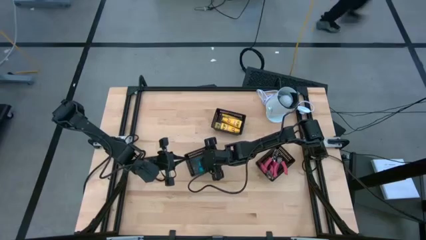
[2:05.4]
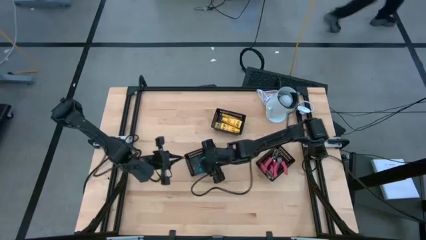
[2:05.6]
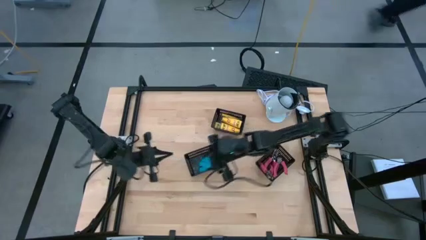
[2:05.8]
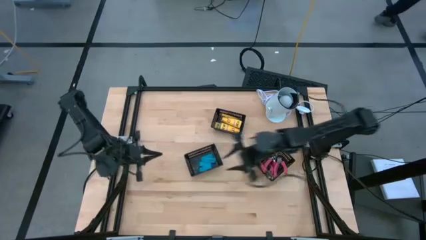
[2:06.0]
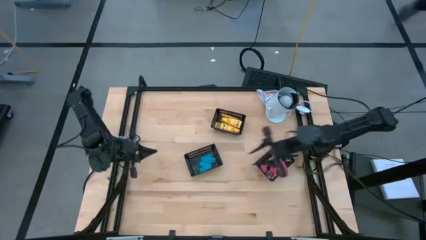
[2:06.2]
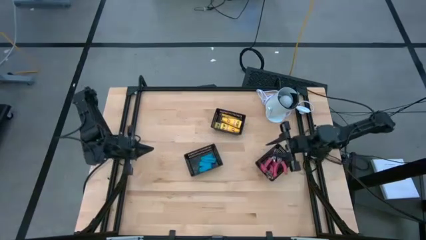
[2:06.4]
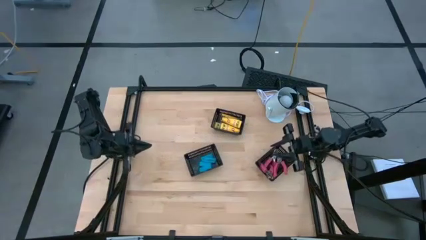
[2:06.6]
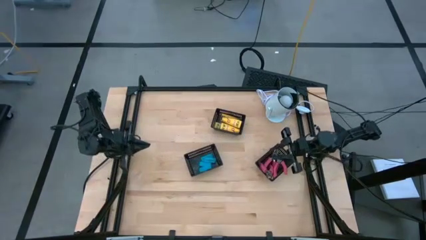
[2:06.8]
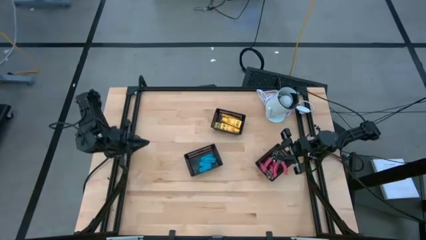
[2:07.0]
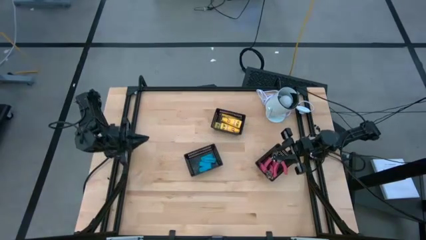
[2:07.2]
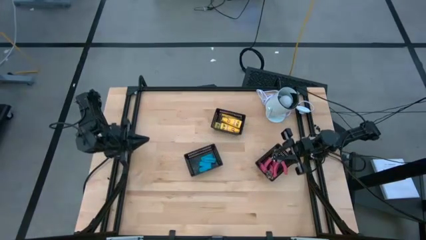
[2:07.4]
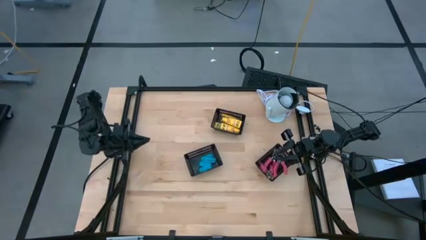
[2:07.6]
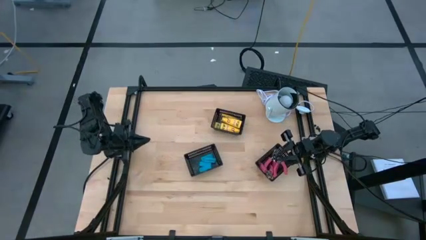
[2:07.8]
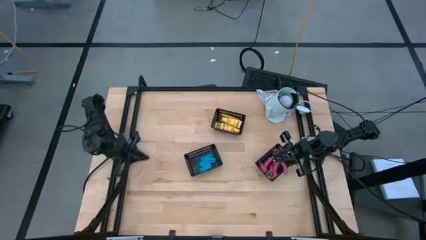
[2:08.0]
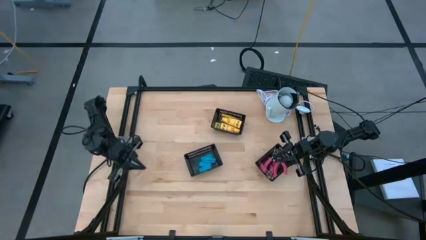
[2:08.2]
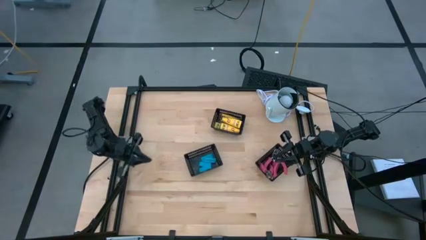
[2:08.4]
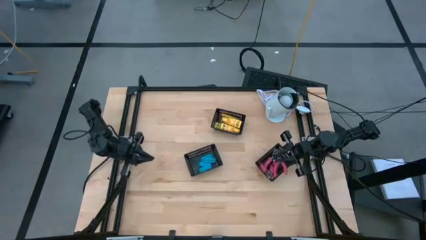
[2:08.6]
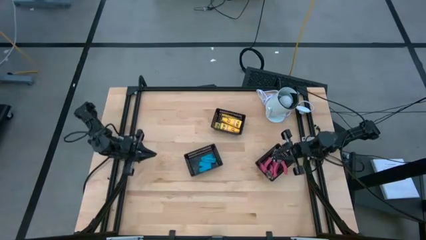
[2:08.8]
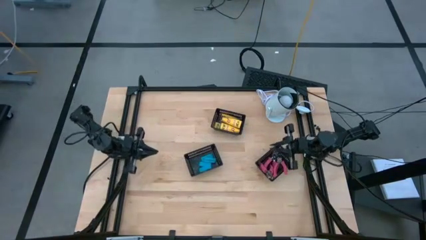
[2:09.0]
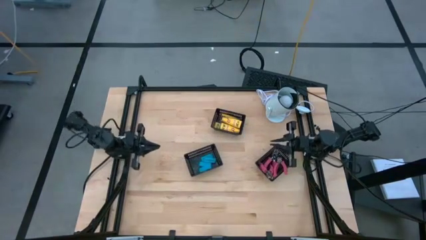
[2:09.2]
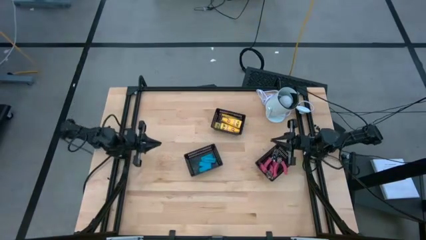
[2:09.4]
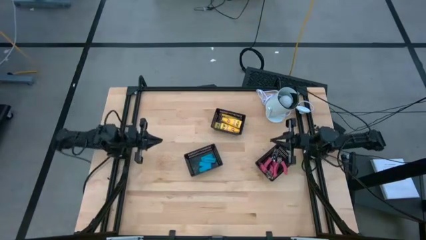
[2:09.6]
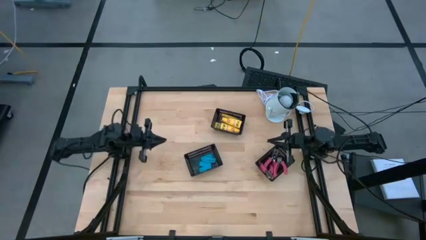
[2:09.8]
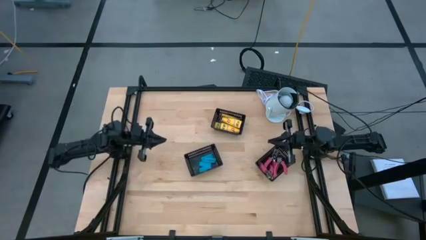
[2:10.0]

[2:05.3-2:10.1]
Task: Pick & Place School Supplies
Return to Home Position

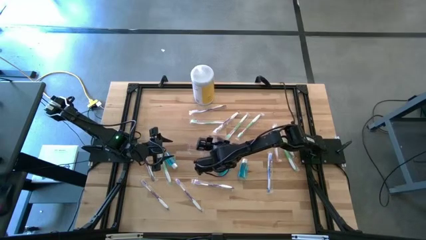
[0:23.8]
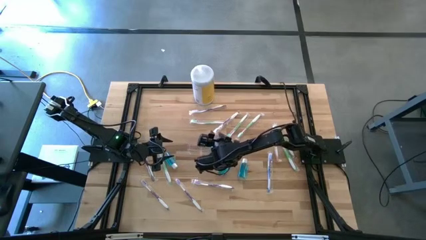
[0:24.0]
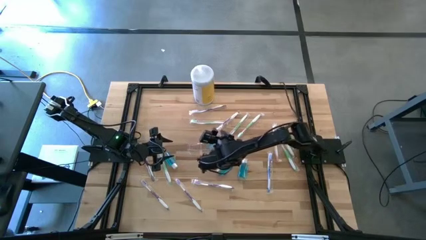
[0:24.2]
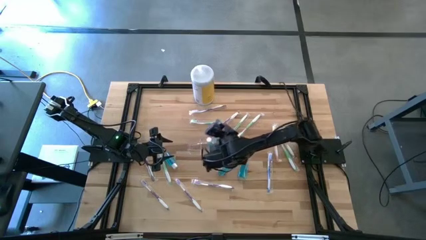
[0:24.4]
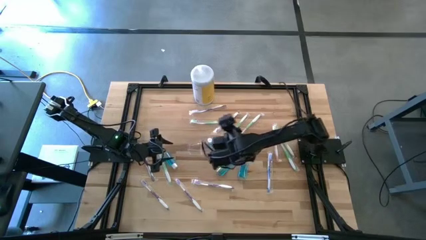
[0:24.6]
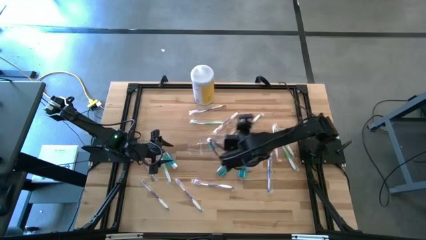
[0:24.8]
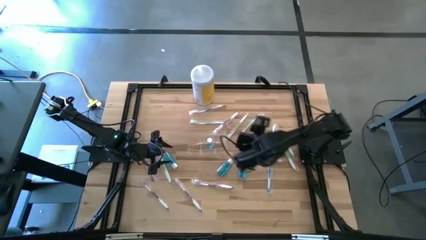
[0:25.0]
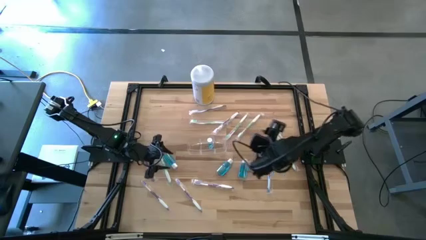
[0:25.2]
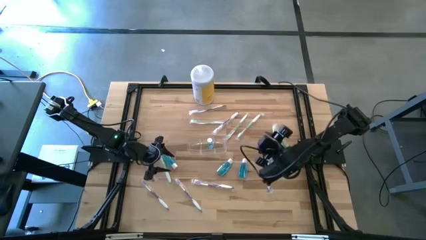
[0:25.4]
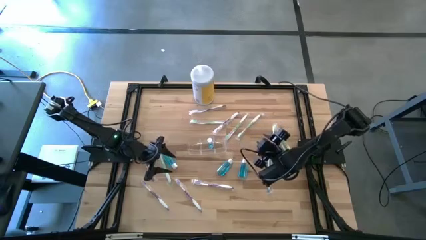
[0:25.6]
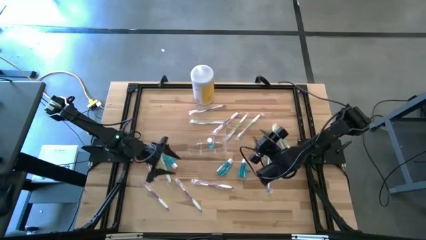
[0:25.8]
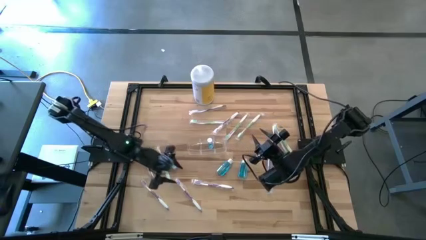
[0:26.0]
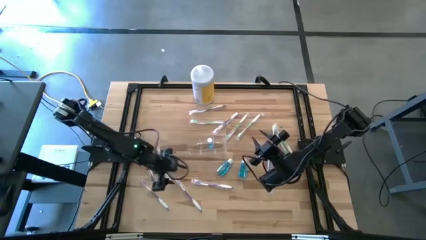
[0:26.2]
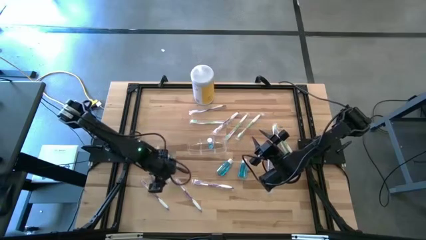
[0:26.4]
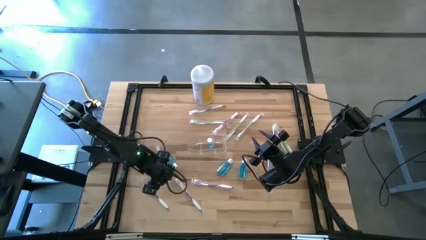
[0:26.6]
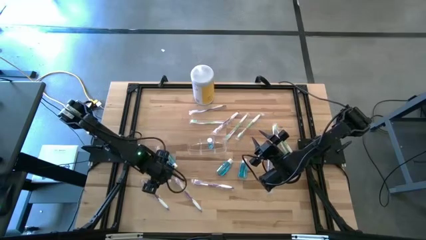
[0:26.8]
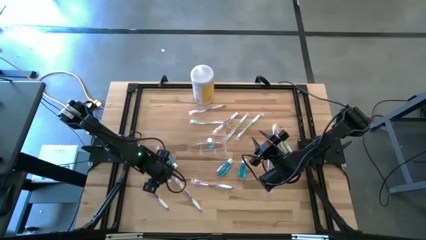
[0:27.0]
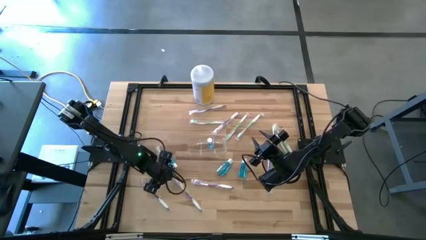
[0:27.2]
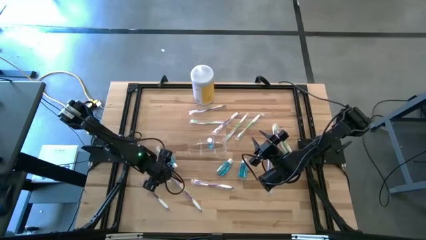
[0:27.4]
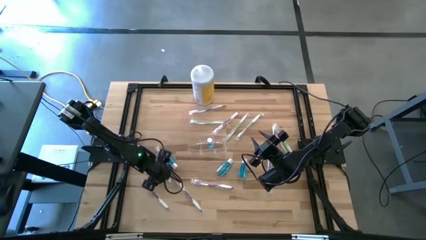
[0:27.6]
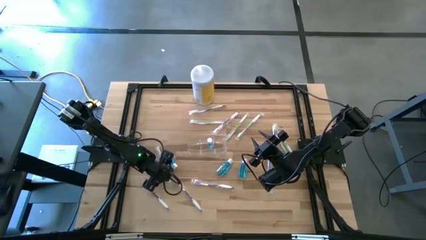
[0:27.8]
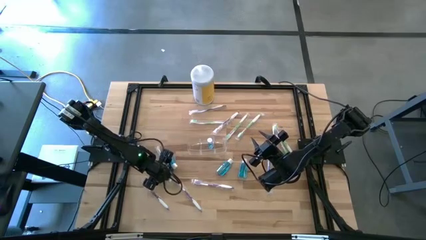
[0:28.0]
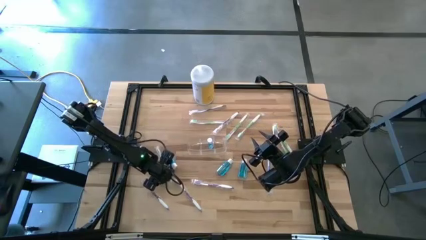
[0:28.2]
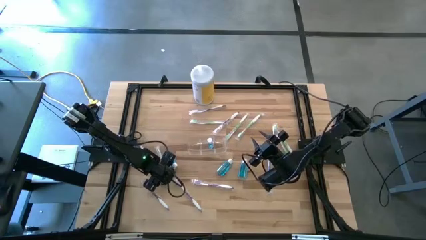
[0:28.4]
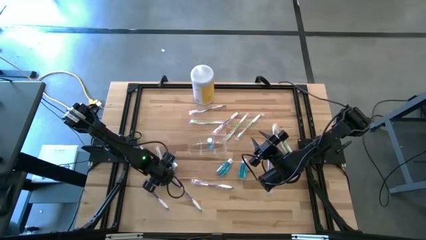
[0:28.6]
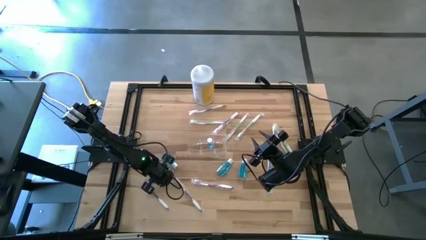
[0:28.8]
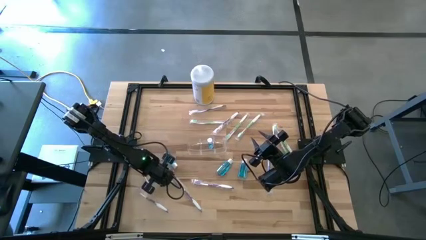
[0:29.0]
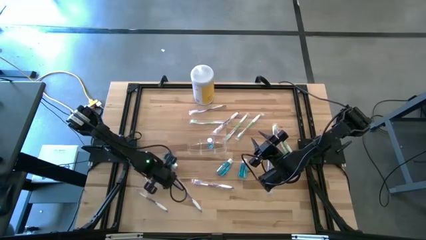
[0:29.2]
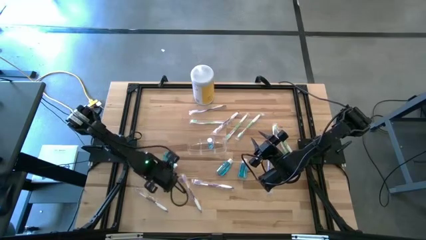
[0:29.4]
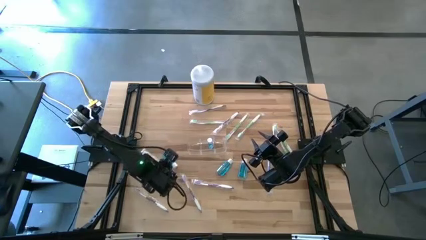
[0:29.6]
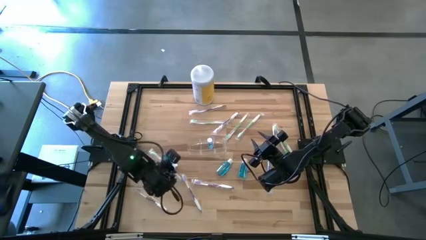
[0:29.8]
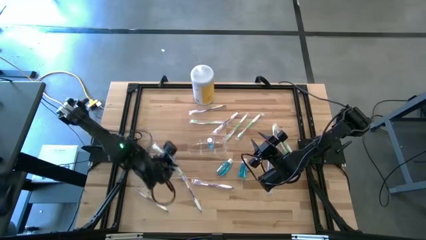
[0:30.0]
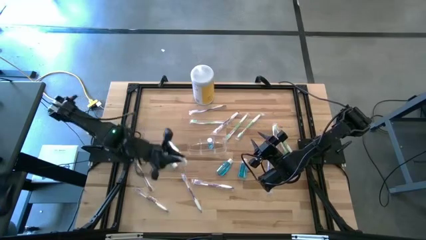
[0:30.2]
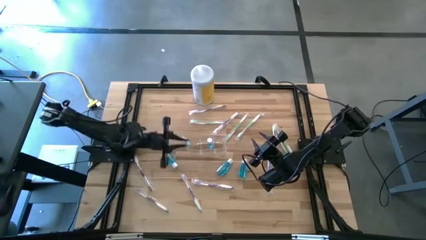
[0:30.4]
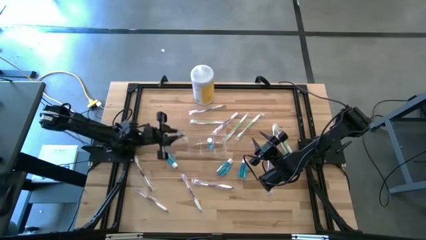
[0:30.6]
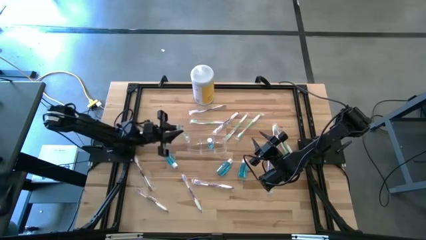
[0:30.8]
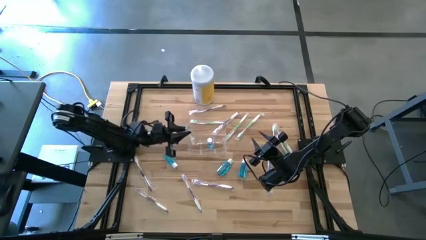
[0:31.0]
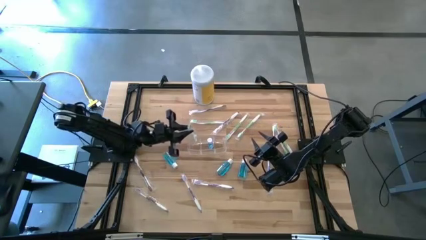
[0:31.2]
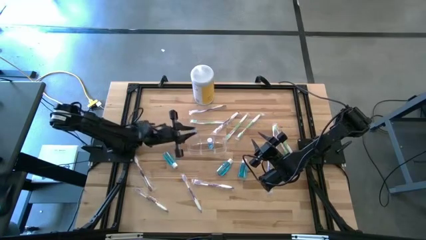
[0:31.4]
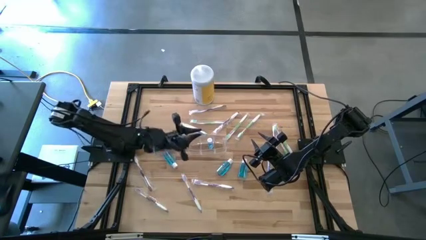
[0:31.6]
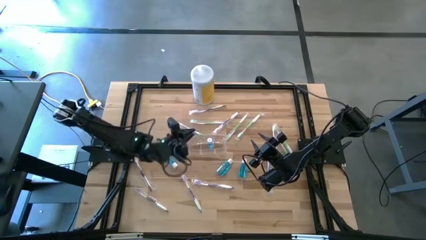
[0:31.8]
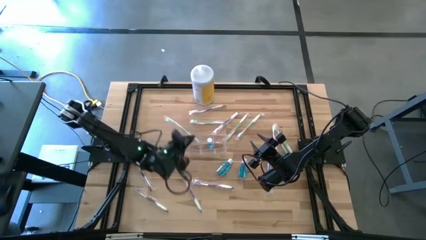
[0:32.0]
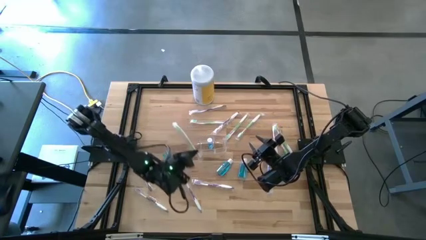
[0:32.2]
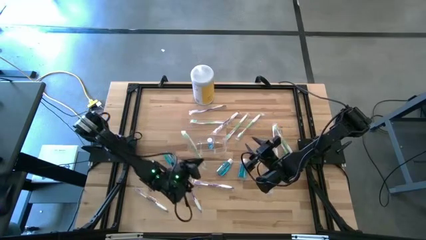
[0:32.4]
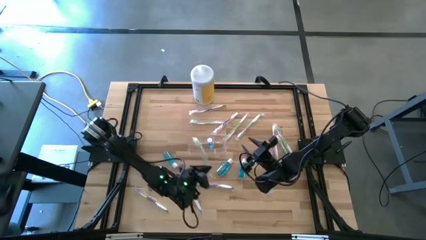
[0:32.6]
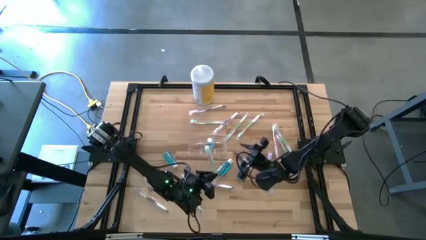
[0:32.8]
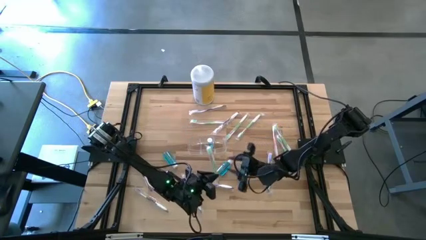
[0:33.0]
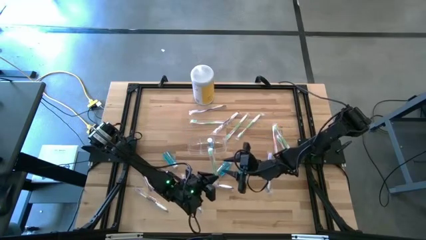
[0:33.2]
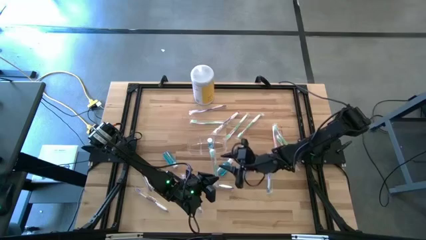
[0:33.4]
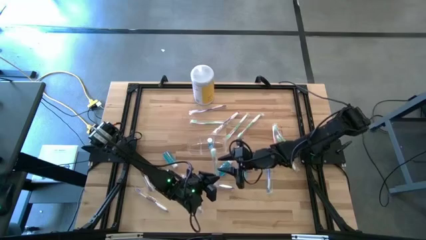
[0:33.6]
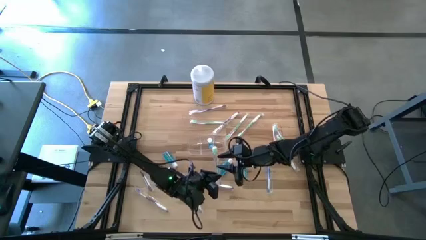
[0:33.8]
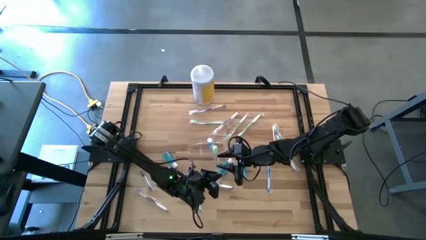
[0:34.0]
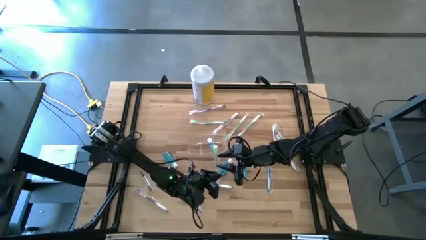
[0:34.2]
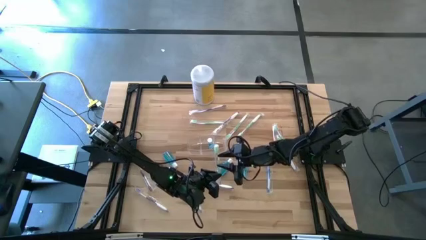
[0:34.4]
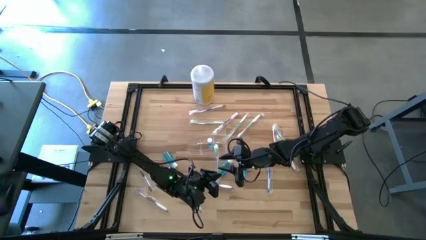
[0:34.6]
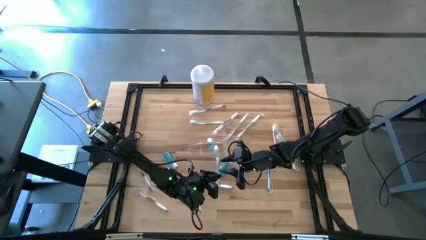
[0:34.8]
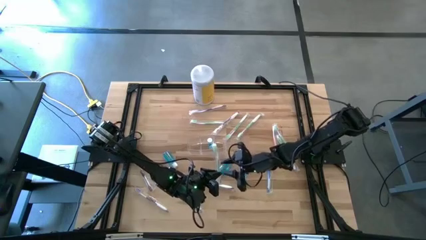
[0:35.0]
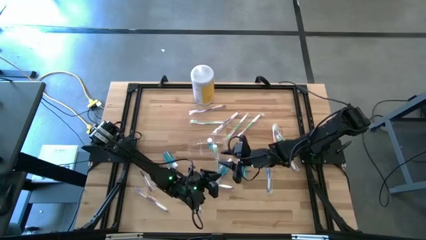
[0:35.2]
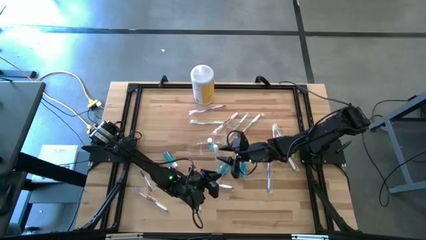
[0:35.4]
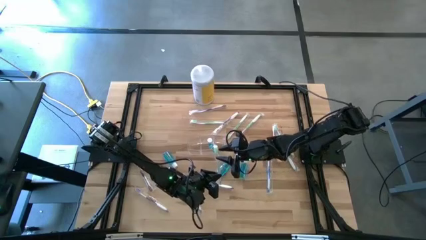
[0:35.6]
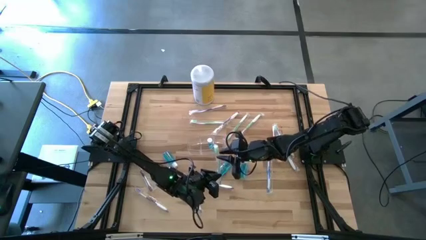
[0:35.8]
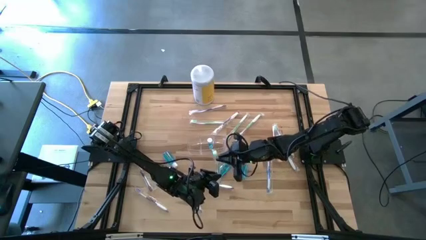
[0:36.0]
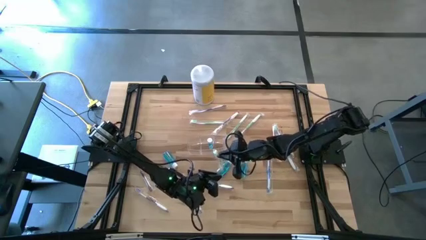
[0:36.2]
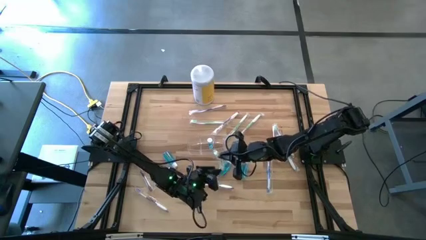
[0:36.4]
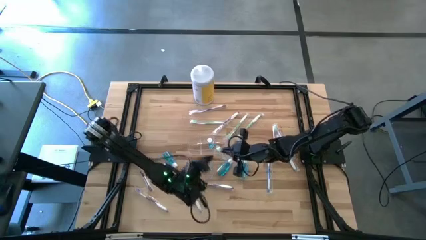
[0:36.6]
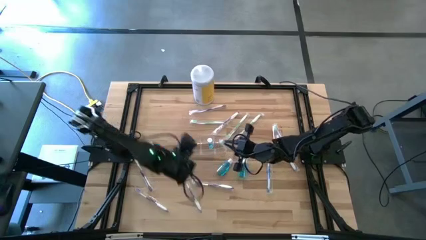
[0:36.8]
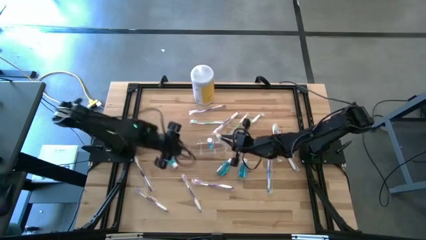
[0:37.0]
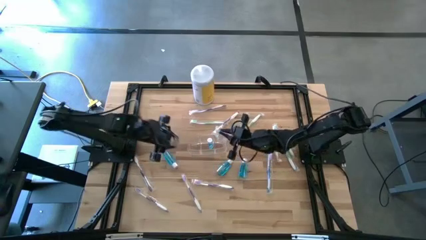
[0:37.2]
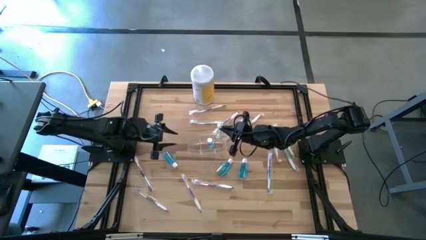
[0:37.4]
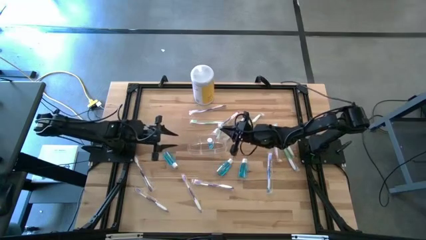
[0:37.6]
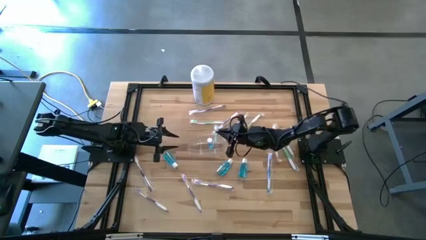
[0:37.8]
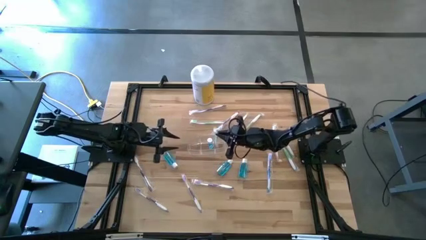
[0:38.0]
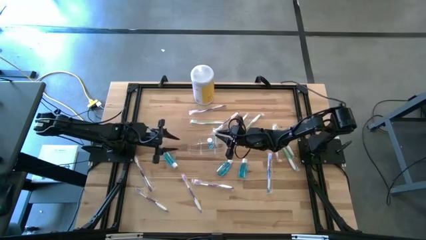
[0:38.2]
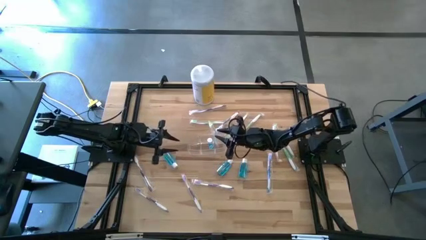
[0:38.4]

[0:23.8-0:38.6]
Task: Pick & Place toothbrushing station
Put the green toothbrush into the transparent organizer
